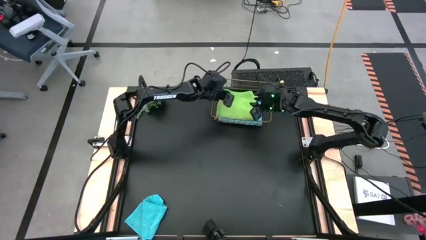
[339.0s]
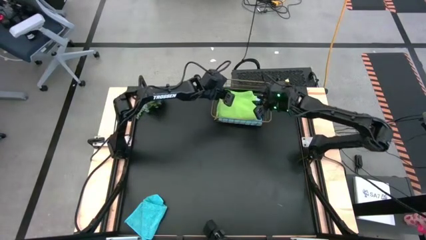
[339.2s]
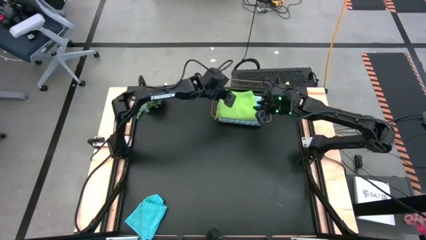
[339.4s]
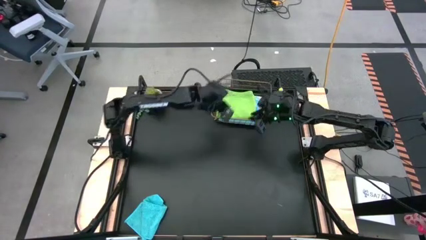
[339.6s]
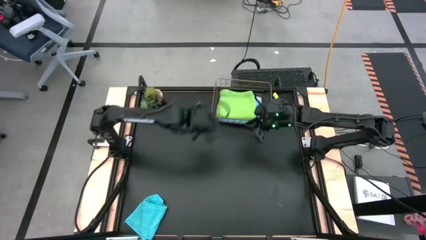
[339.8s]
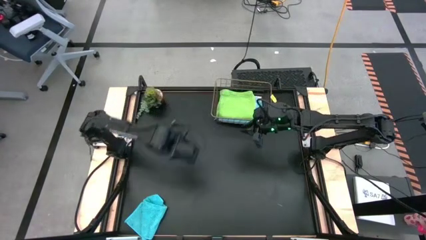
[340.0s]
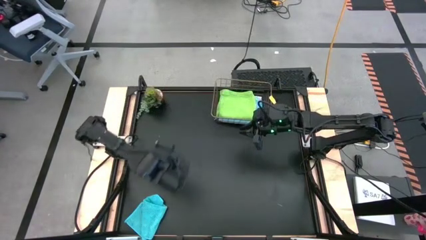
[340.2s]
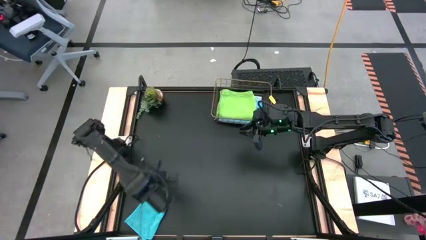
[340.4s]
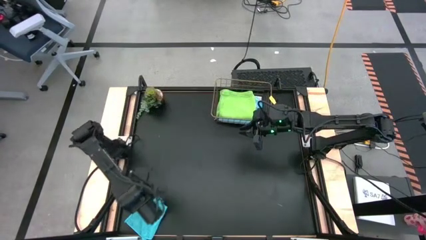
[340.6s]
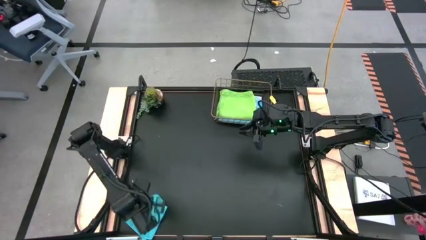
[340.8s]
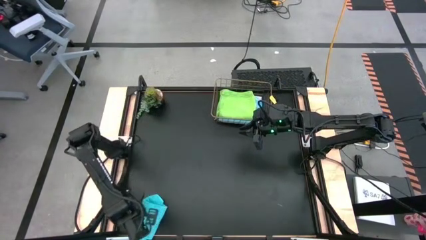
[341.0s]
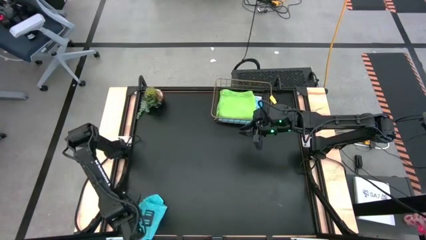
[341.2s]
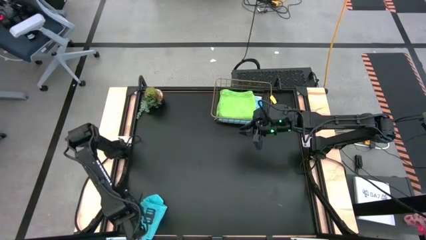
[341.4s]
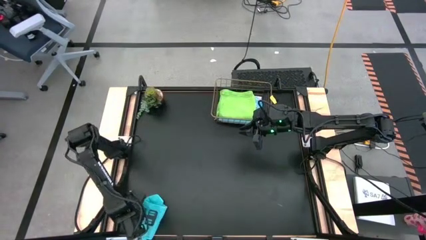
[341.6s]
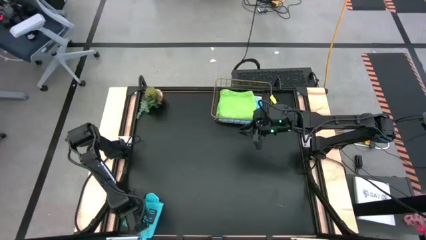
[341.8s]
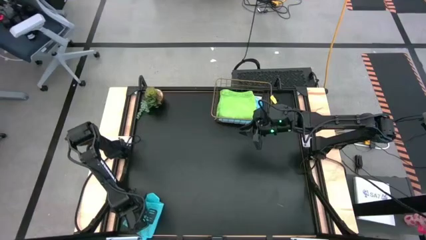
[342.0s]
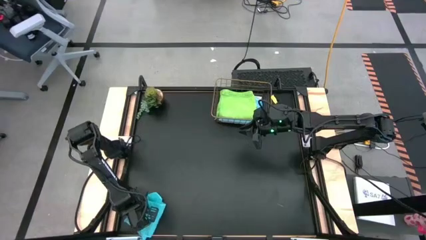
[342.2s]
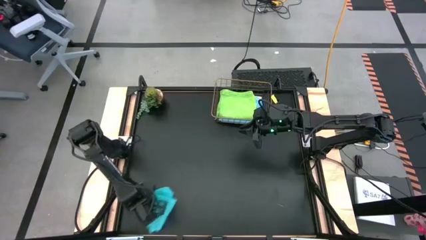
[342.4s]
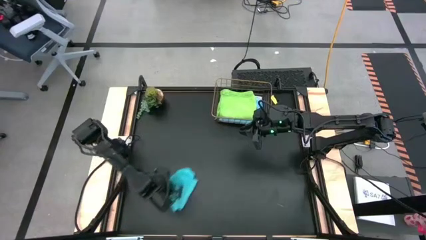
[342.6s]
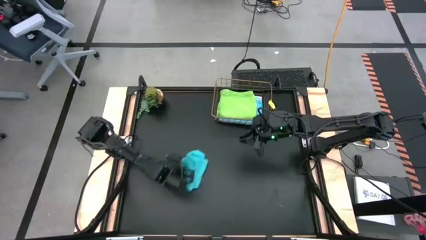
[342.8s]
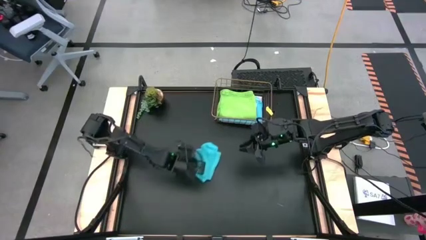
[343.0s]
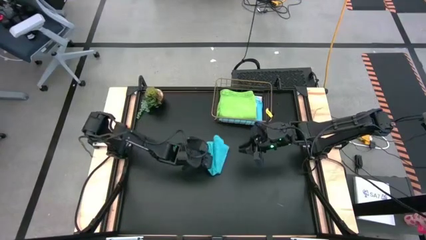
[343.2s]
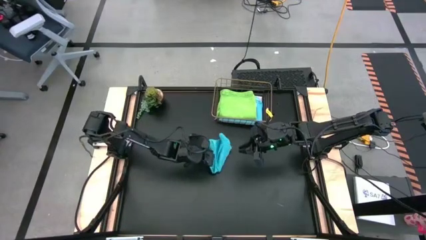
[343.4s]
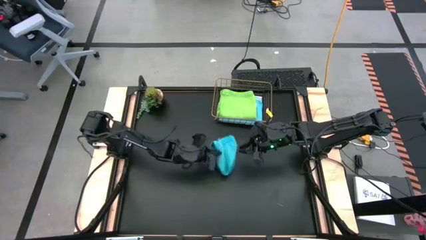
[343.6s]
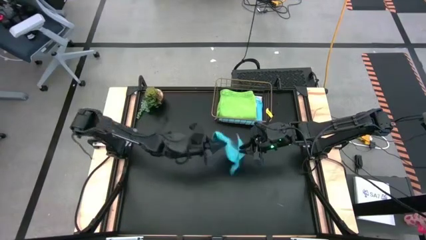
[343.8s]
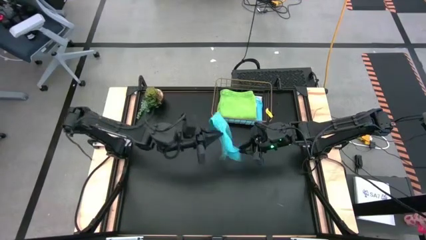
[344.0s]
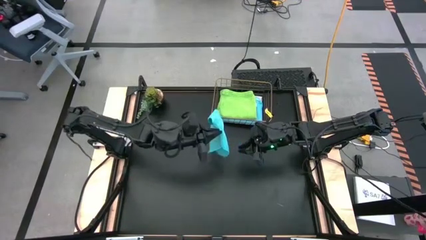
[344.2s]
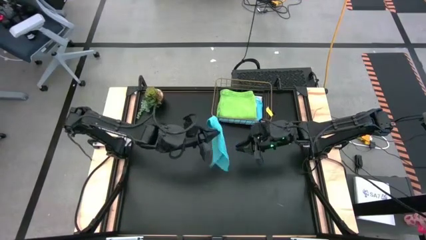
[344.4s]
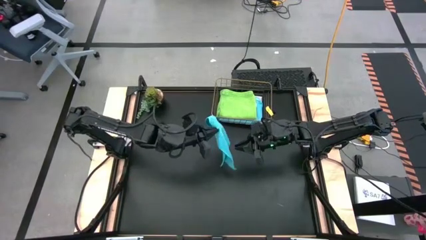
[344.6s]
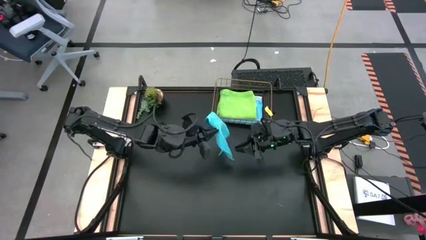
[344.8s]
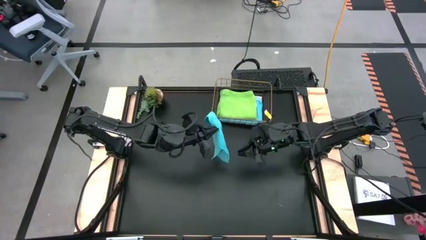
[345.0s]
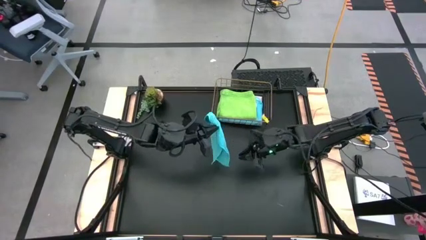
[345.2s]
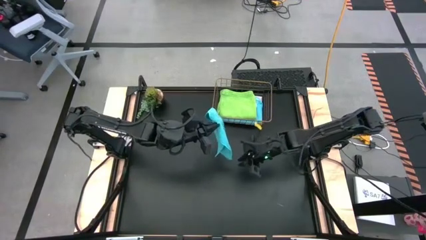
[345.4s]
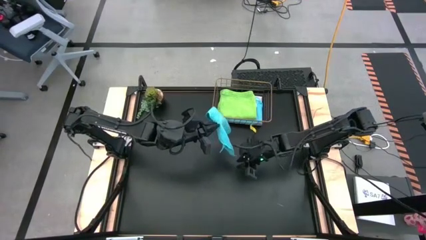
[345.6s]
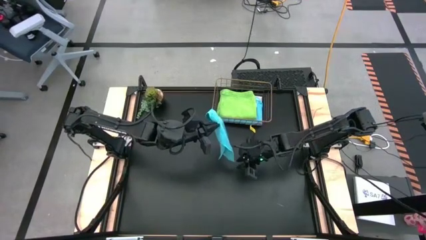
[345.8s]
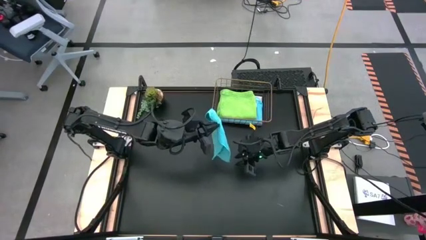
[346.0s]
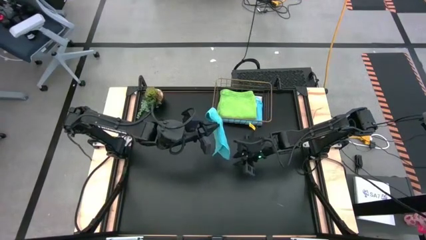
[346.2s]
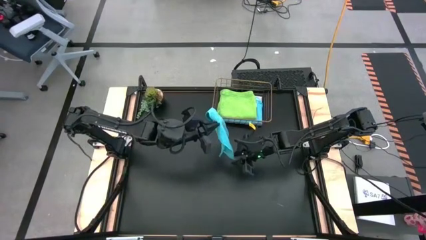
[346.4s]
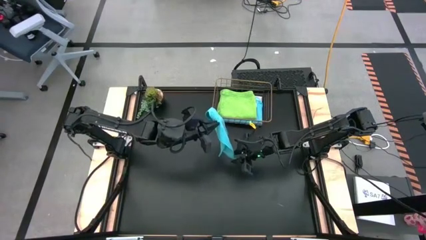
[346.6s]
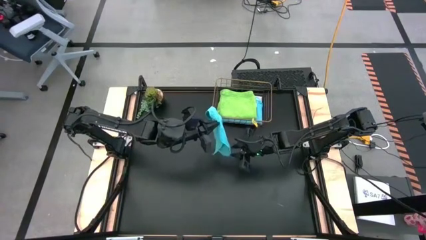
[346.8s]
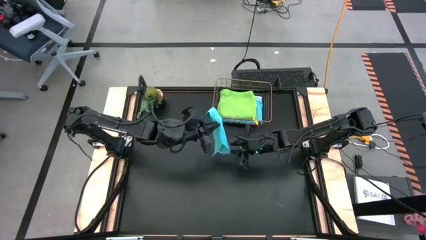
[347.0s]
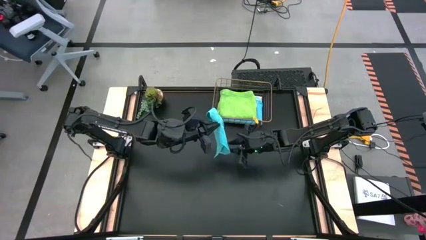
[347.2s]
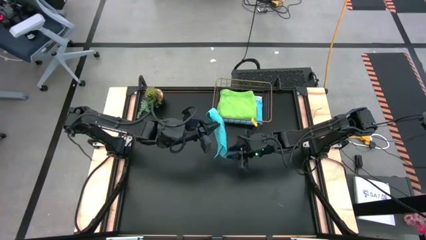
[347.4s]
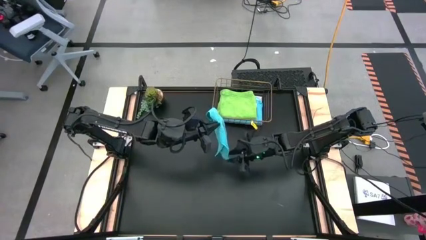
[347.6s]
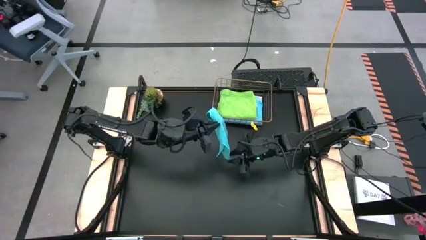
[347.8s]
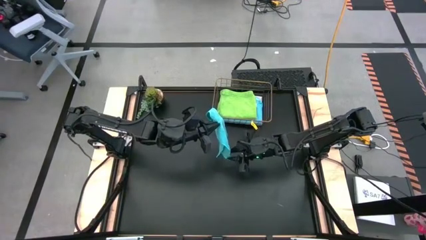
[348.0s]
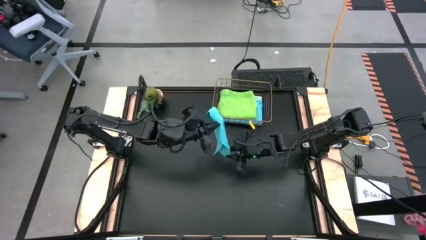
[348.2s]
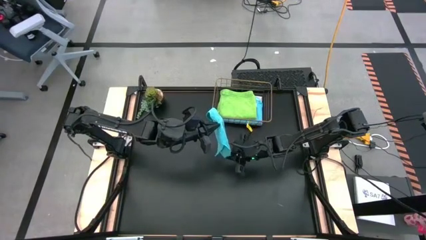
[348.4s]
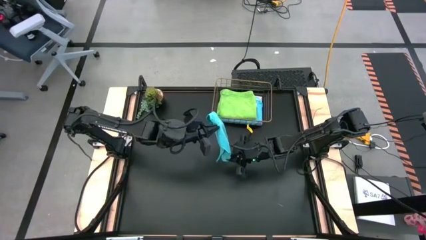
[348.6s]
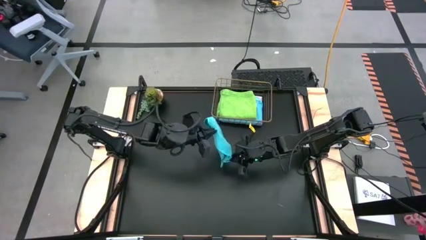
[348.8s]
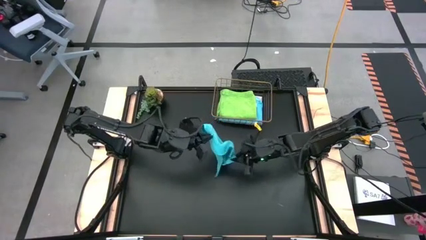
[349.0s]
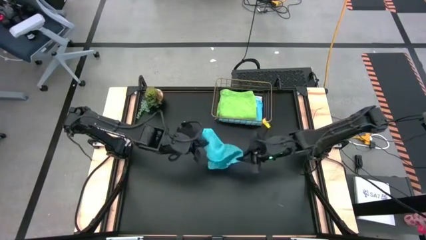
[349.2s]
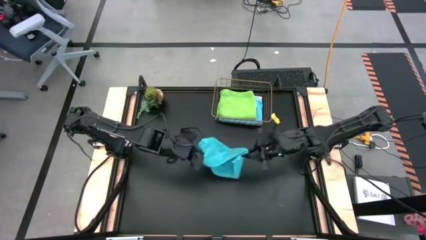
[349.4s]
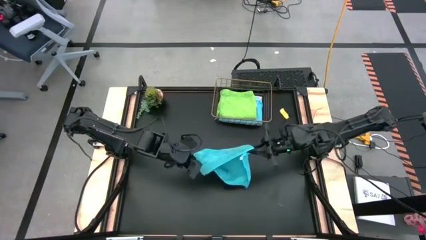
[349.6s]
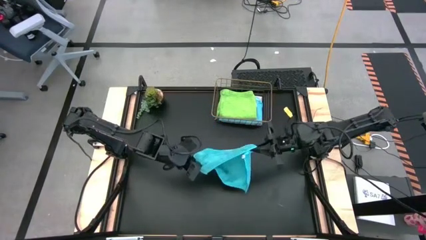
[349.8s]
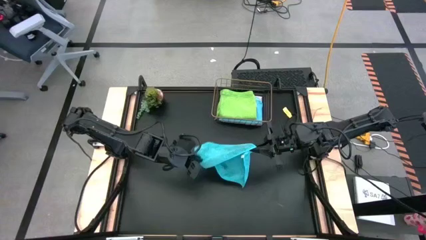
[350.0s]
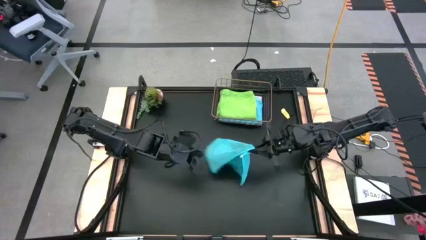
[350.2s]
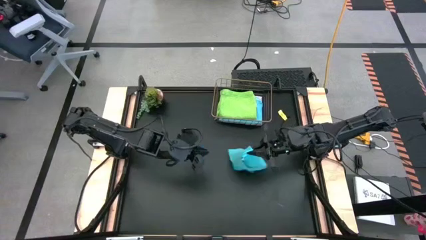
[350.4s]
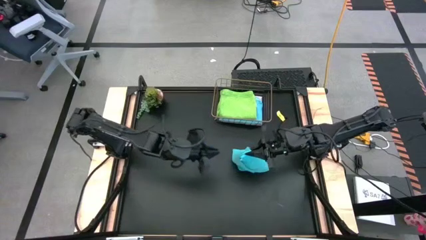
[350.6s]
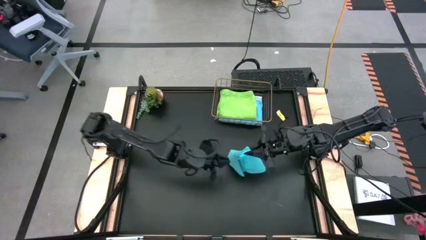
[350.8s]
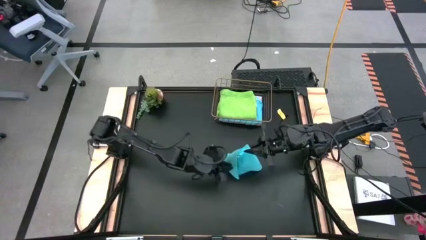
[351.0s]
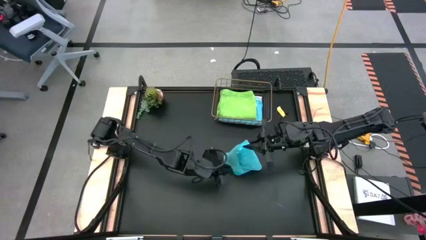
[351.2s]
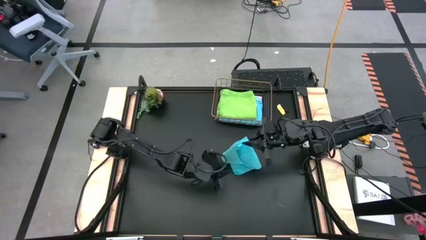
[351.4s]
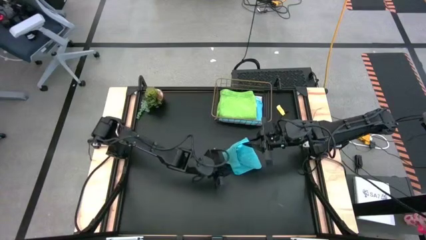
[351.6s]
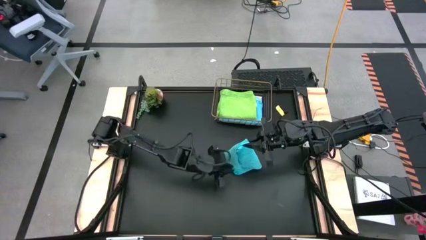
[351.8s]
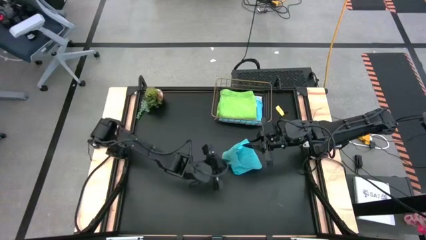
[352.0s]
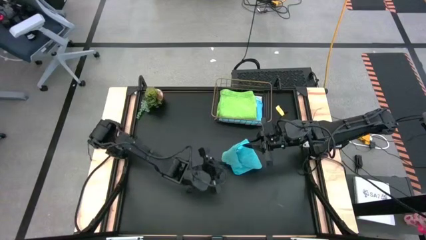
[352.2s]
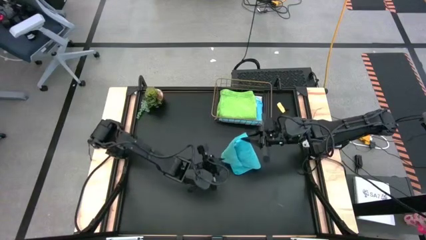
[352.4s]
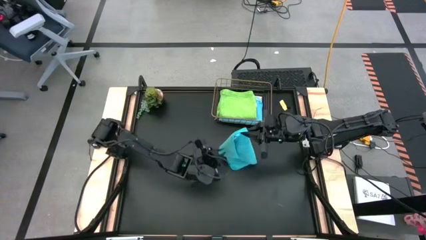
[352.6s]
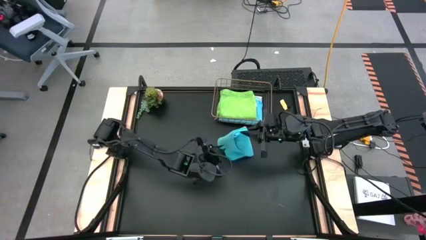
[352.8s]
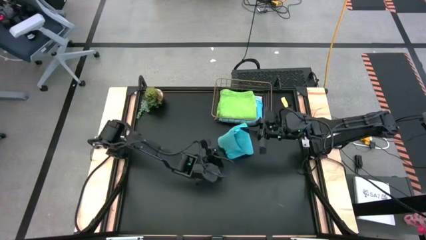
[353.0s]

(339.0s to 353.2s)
Task: Fold microfiber towels
Fold the blue towel
